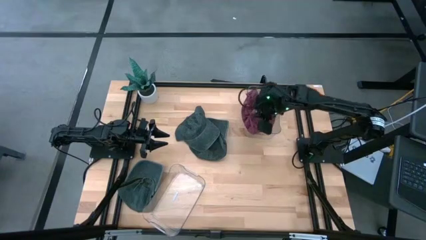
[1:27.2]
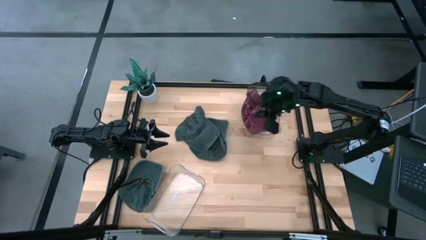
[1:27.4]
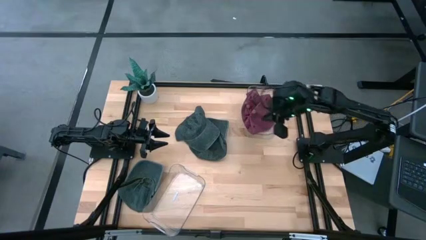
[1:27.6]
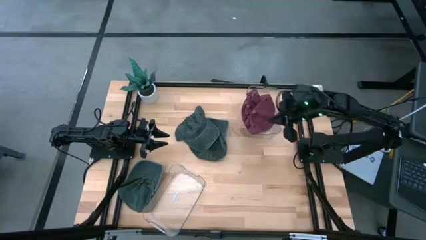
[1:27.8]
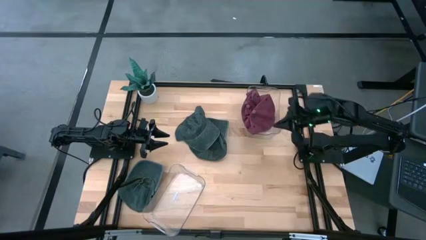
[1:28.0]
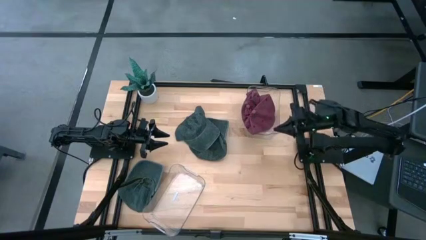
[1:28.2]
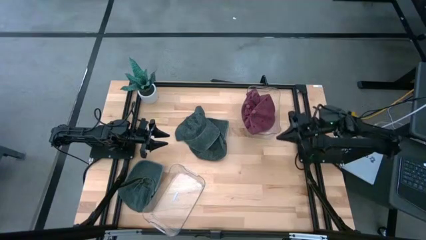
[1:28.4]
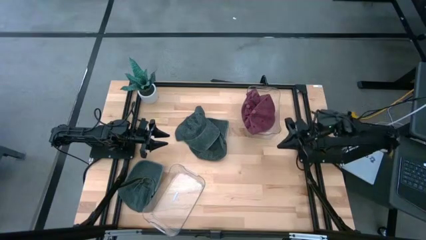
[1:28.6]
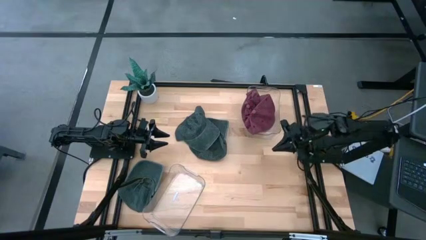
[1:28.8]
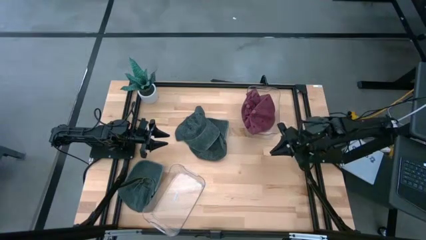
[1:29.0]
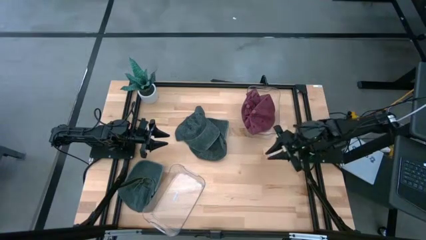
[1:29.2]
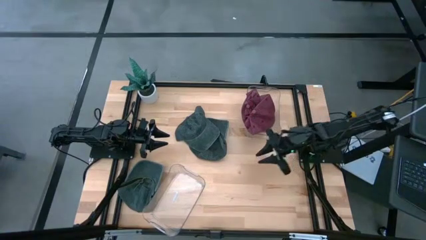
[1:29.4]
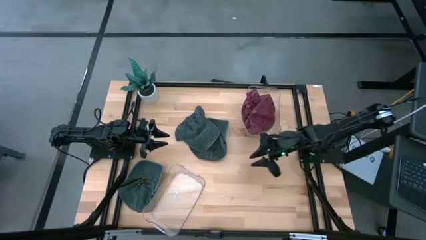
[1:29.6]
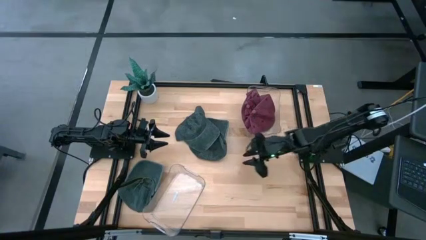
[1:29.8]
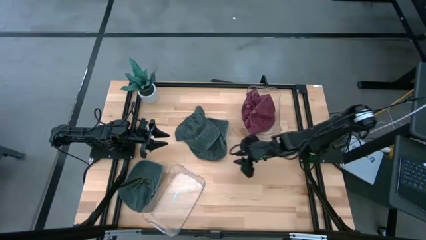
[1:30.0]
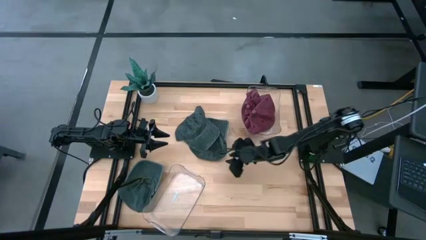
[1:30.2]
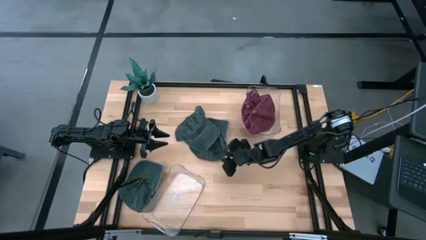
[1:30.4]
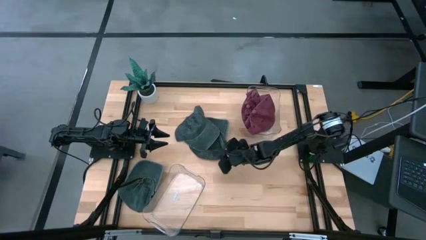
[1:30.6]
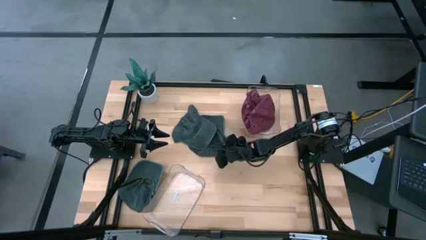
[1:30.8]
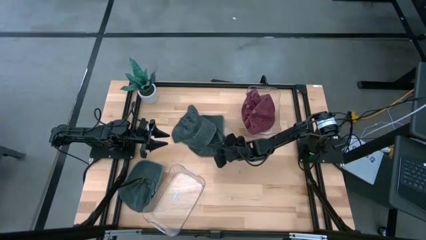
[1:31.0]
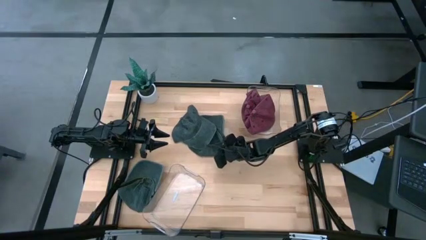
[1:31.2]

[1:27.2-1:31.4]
Task: Pick & Place hat
Put the top right black cap into the bottom transparent bin

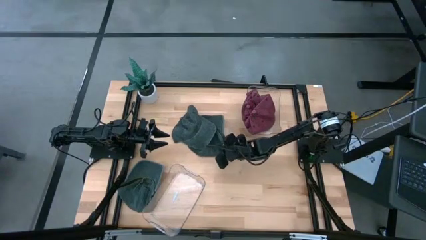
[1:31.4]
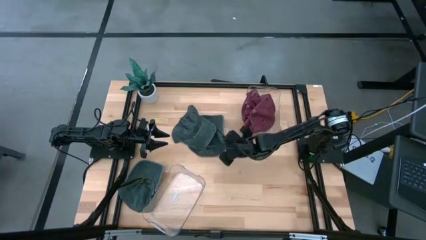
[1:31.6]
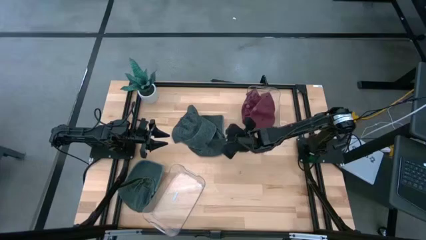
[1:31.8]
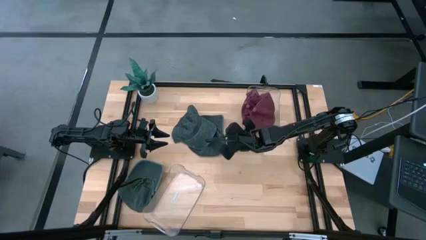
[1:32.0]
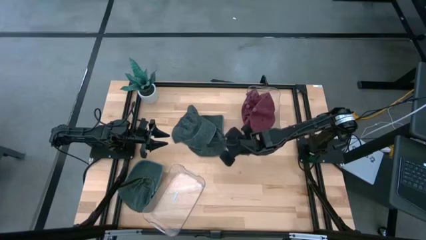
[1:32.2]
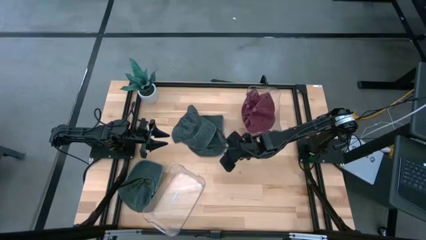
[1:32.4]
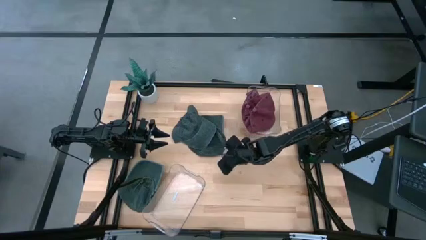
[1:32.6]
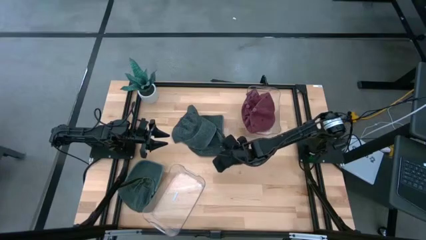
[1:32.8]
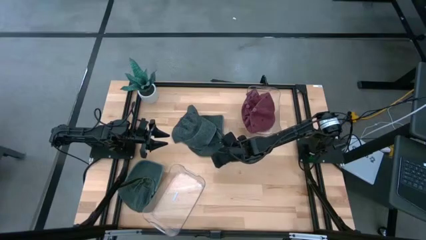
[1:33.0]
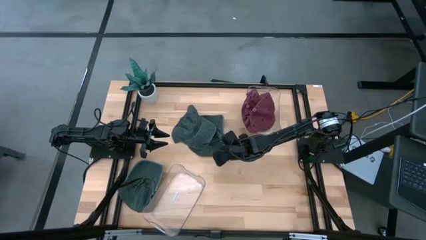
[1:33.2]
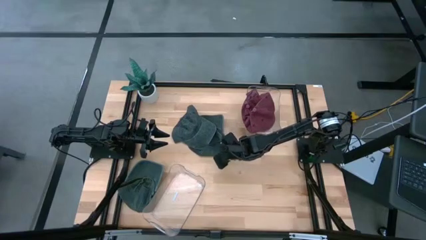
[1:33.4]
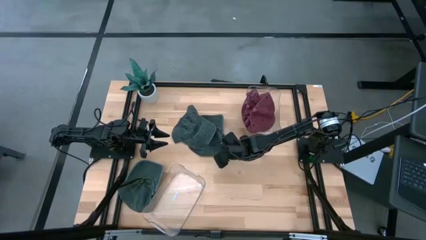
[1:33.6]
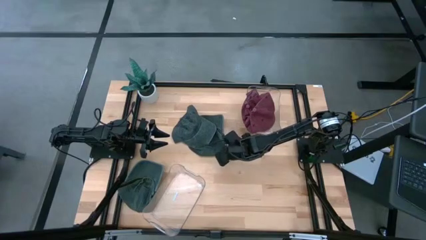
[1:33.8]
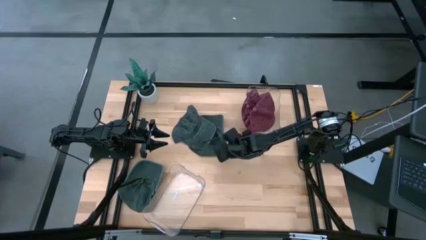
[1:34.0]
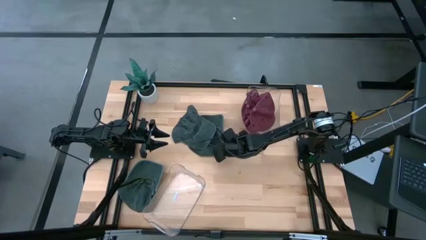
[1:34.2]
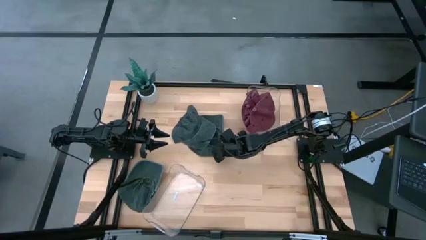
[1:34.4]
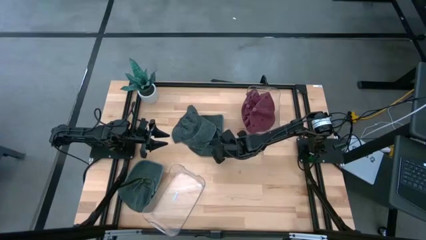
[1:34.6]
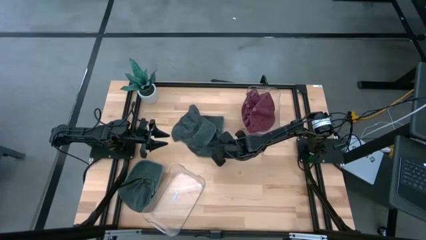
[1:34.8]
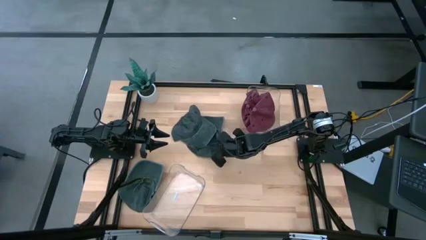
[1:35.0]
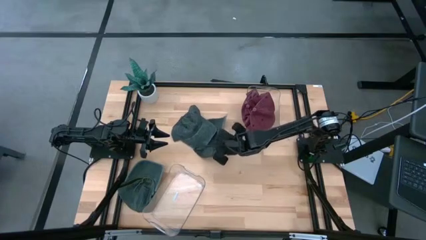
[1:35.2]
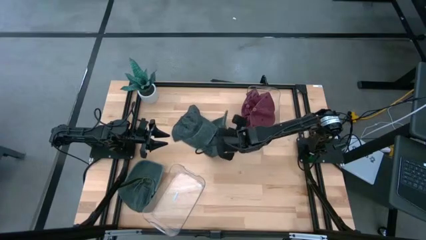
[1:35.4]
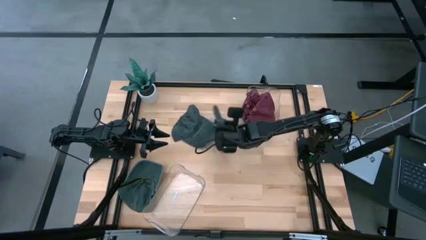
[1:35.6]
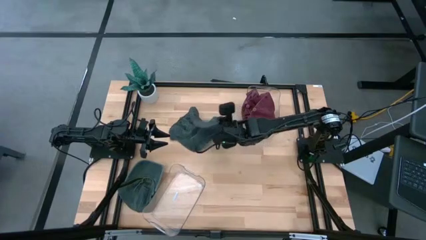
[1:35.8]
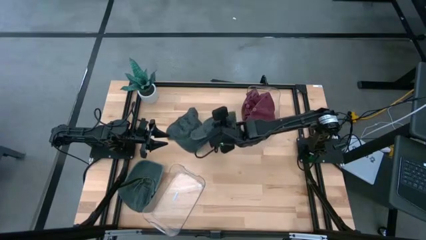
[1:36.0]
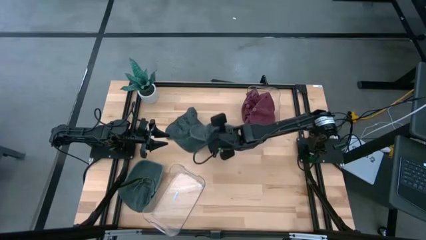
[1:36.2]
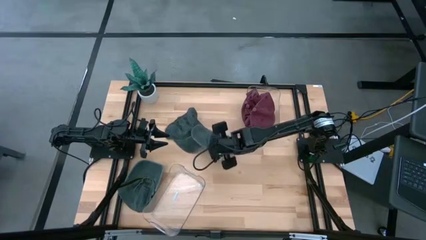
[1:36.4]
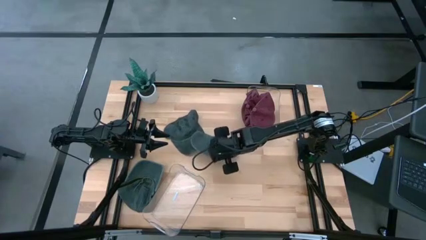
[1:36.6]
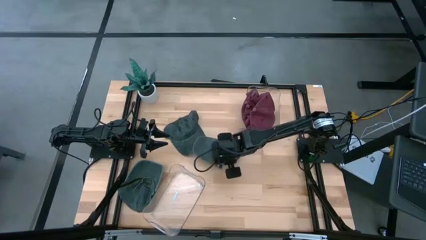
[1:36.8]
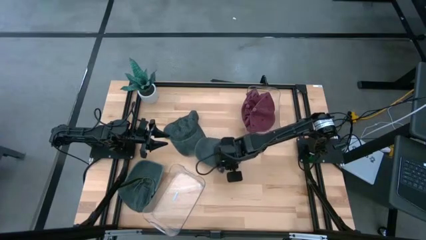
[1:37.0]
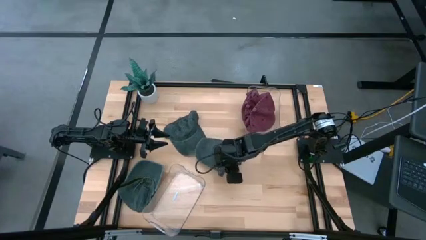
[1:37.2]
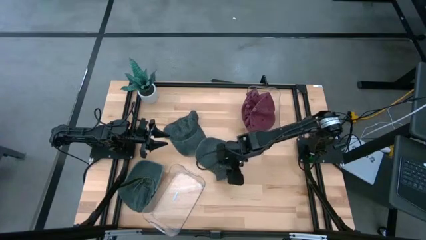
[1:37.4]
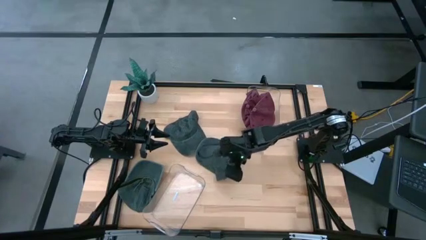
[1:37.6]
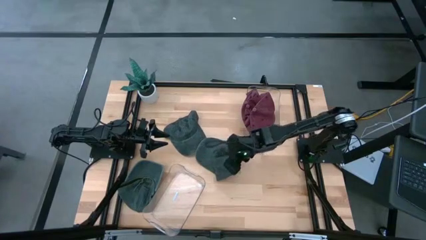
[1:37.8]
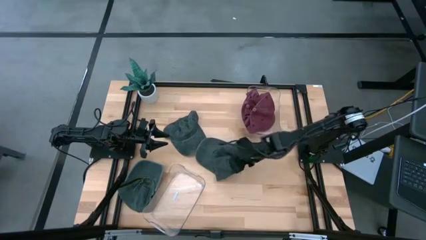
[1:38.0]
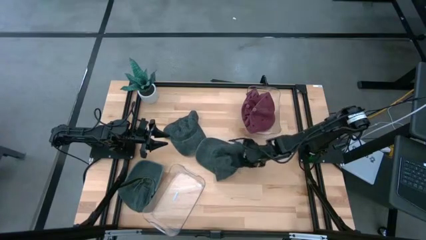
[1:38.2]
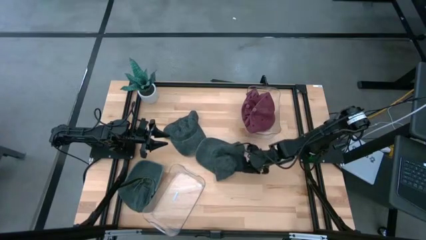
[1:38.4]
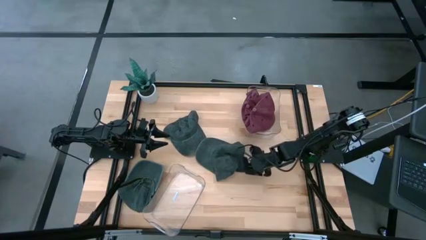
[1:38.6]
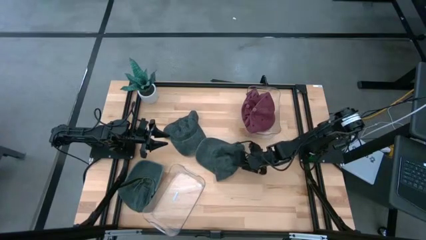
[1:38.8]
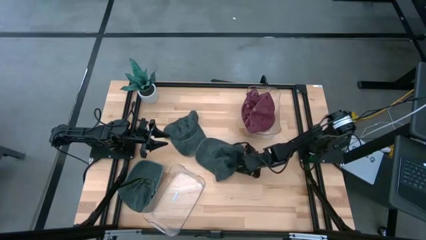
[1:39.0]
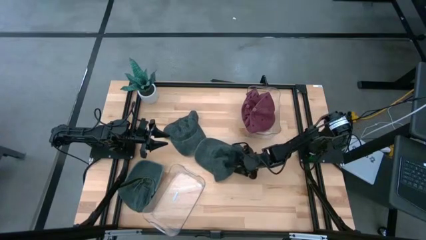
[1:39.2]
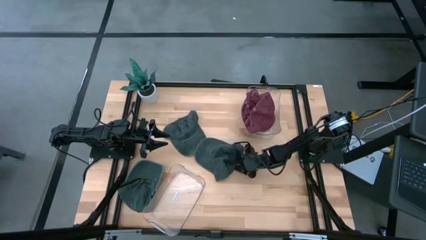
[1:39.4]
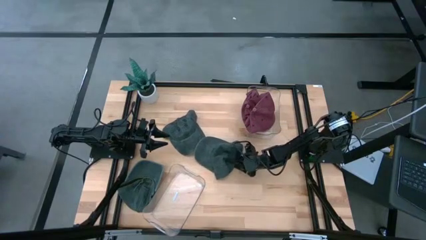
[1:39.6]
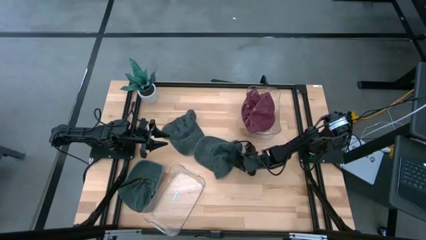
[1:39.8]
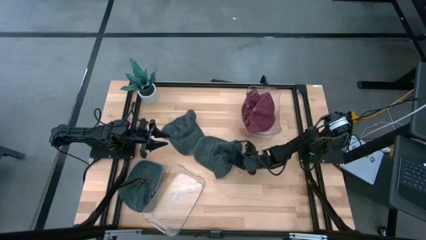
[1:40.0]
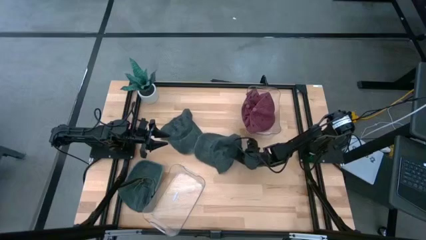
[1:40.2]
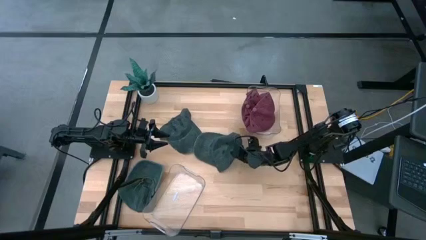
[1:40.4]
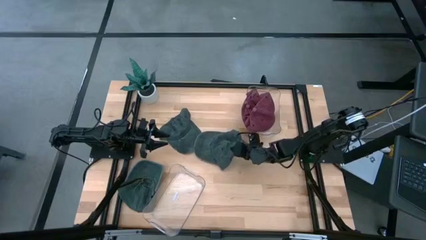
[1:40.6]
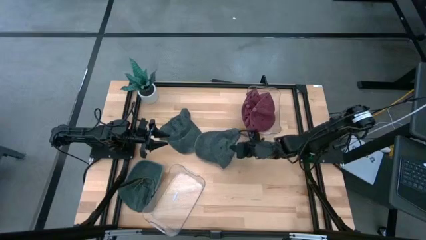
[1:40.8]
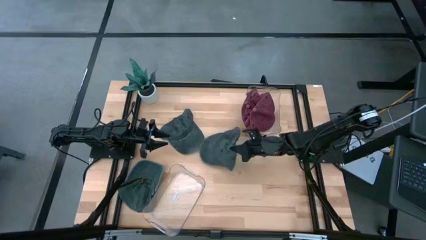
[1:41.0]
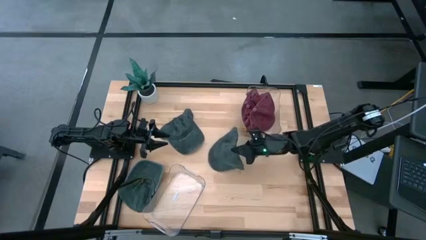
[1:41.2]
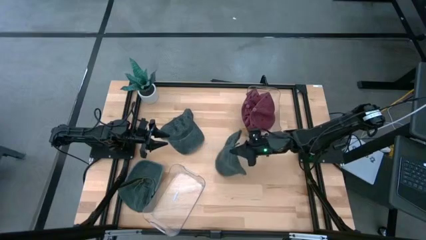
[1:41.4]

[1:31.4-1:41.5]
Put the top right black cap into the bottom transparent bin

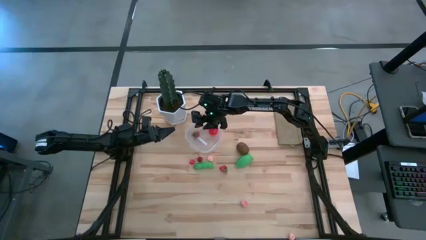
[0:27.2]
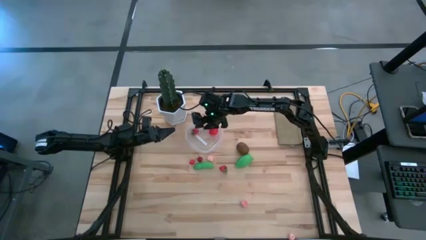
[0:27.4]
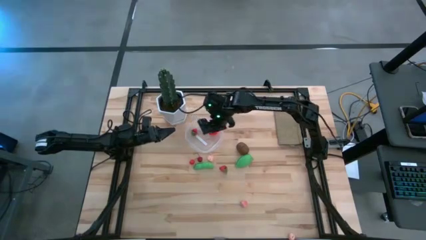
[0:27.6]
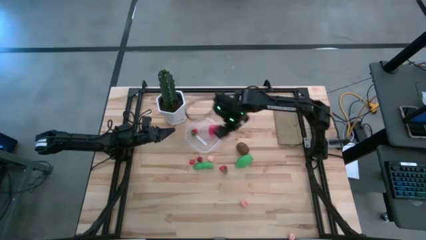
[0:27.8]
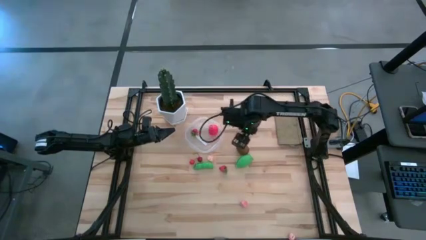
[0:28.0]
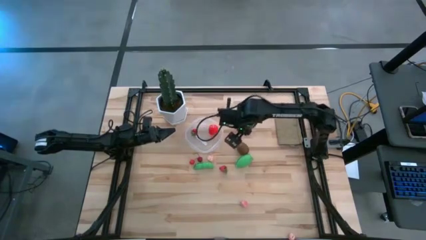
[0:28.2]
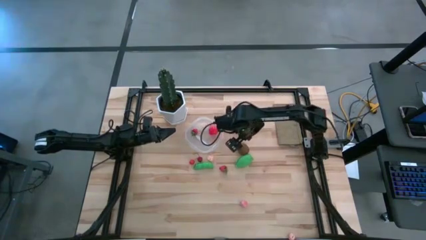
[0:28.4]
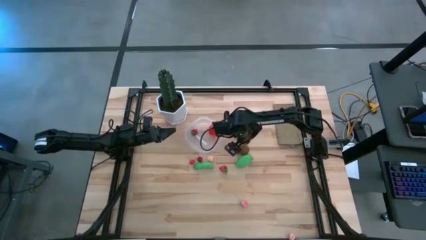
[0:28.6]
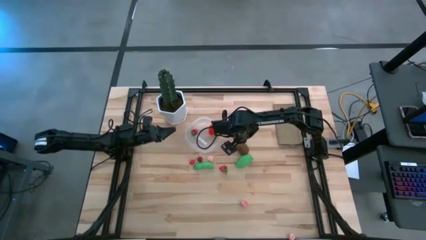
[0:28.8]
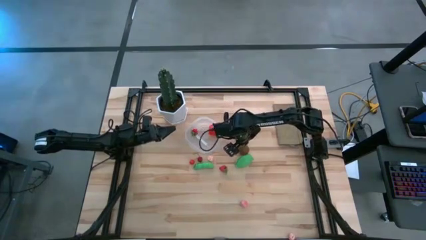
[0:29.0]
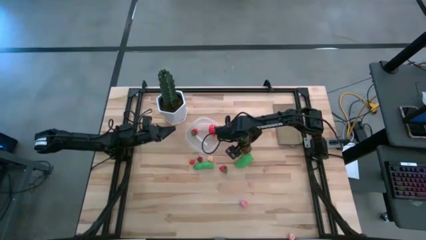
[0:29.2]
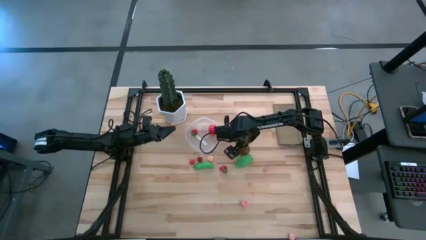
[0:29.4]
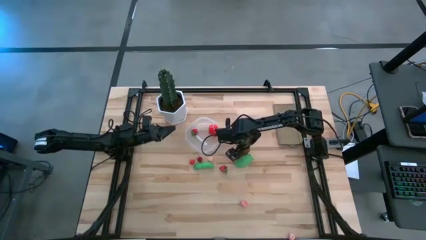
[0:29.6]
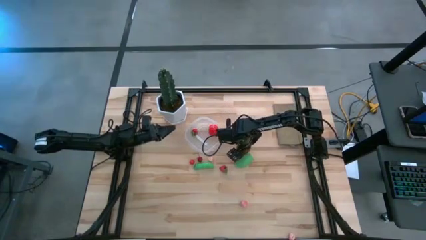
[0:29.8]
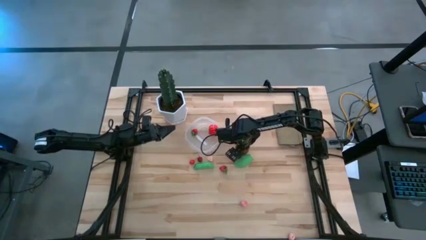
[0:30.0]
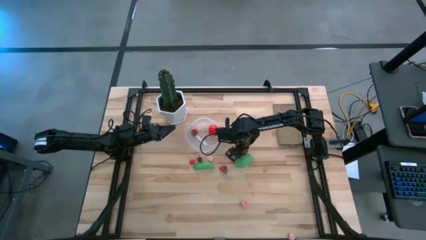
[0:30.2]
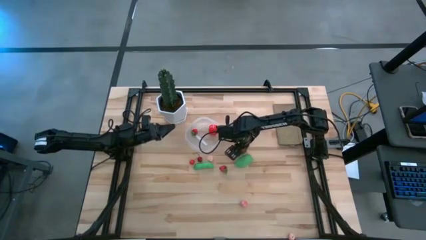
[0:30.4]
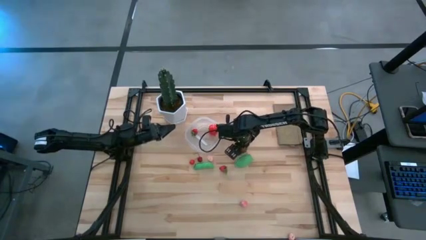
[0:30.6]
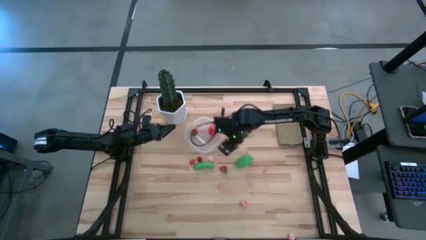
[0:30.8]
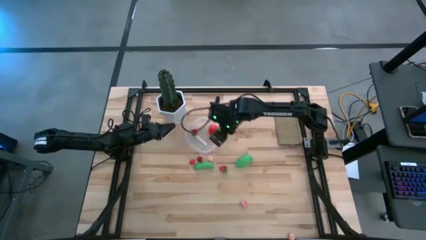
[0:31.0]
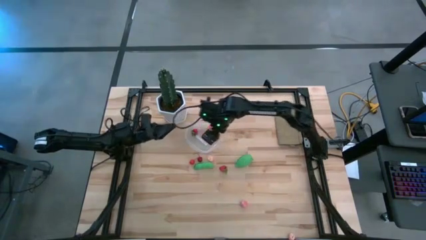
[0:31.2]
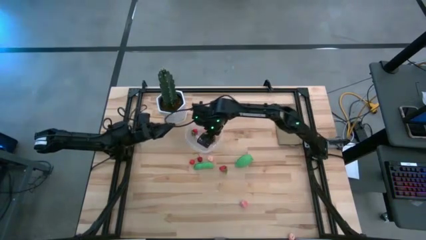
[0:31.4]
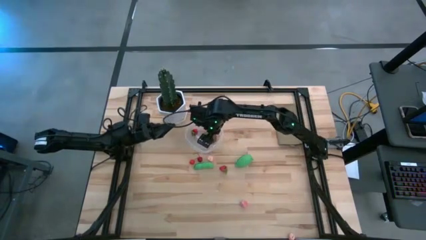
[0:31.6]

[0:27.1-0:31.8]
Task: Pick and placing Produce into tupperware
Put the brown kiwi into the transparent bin
